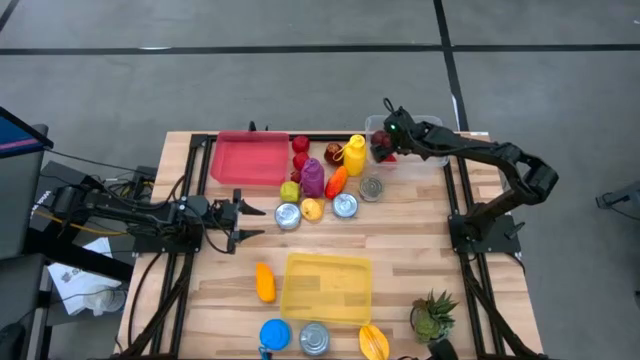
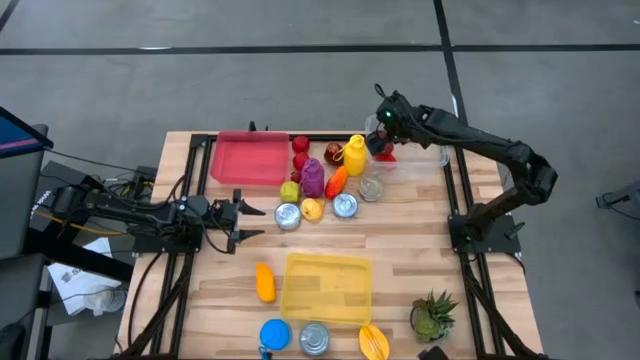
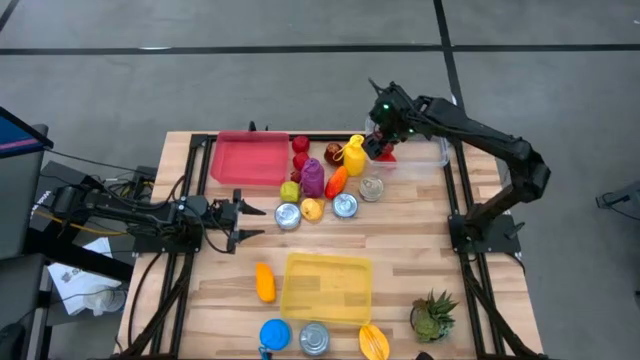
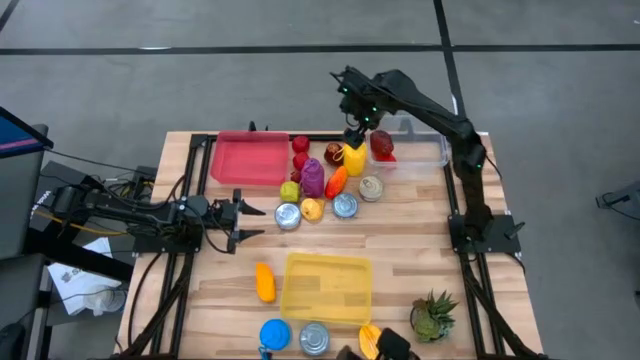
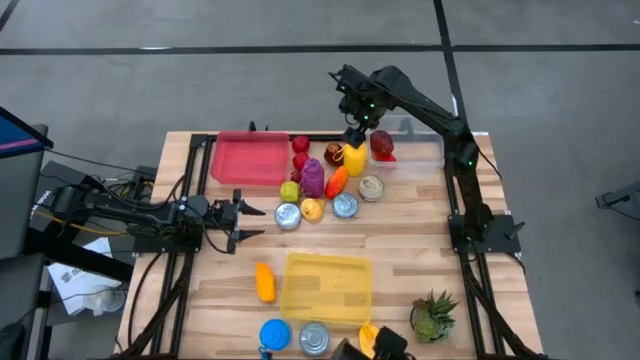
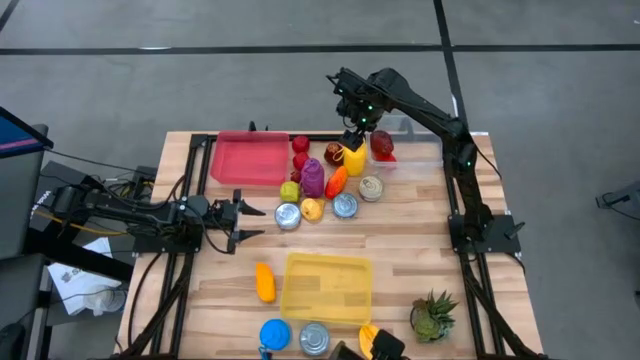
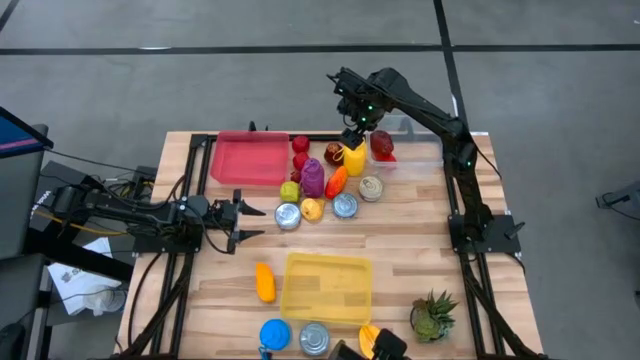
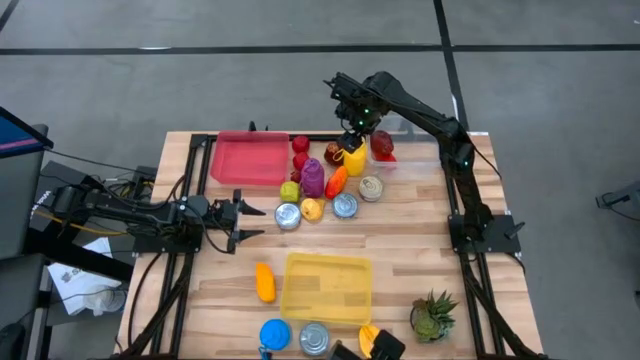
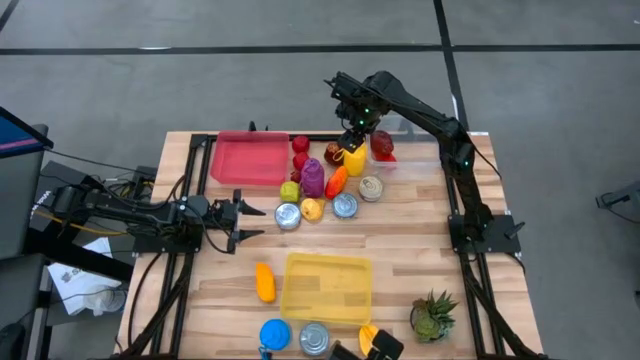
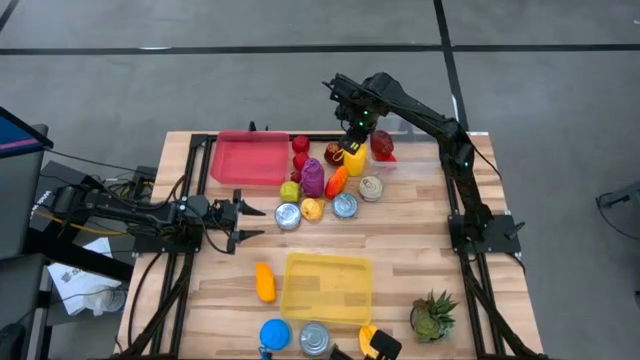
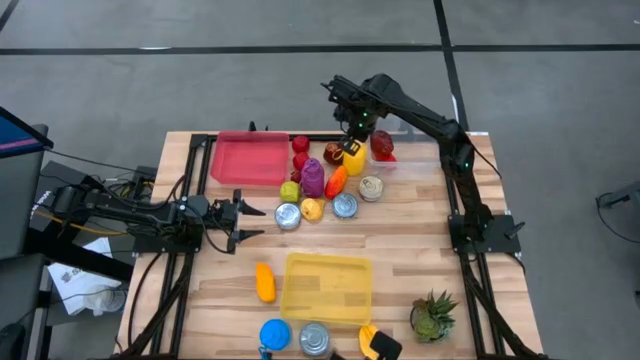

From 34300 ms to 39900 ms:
Task: Pick & Place Food Item
Put the yellow water bottle into the yellow bin

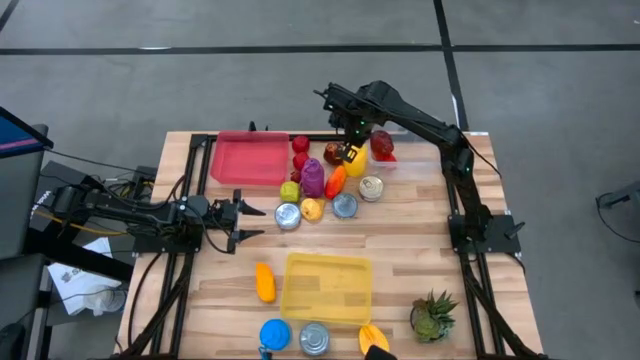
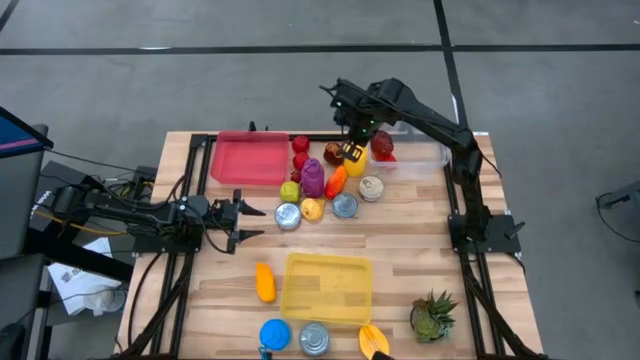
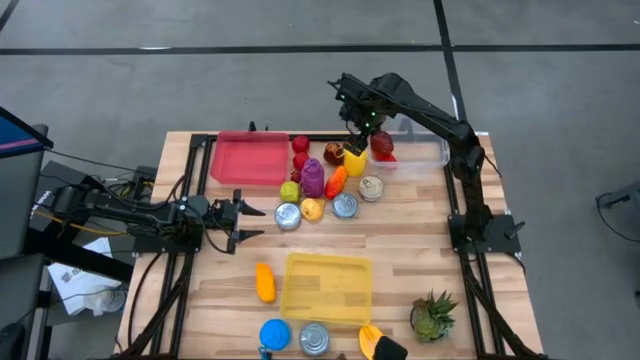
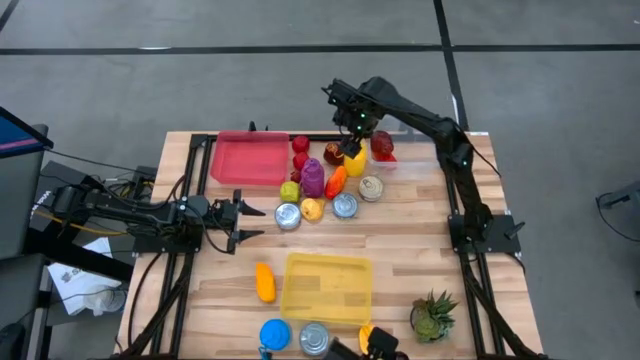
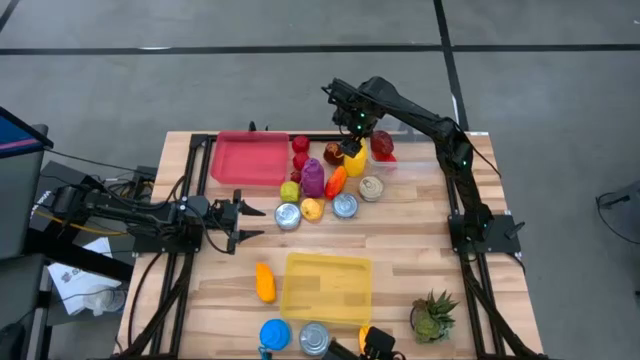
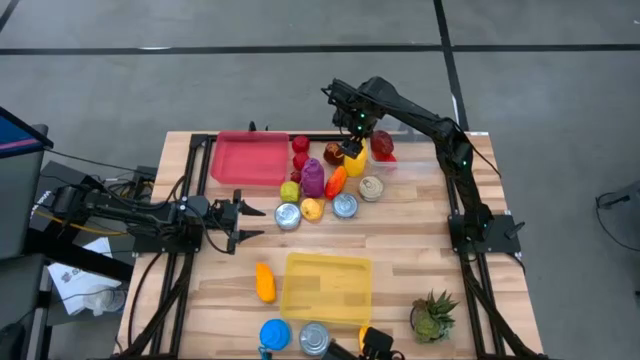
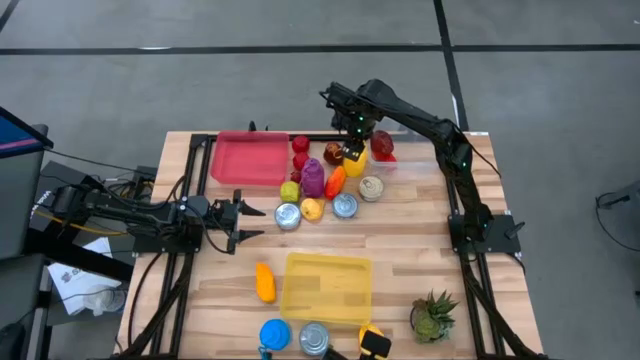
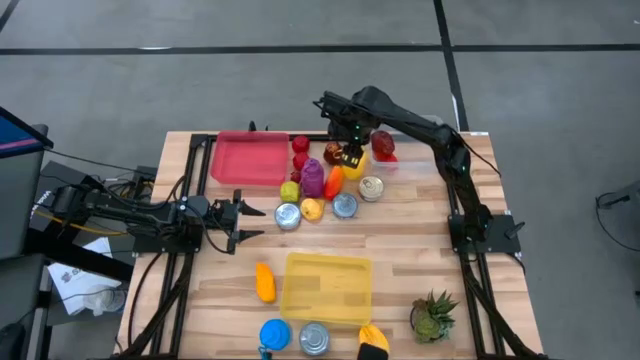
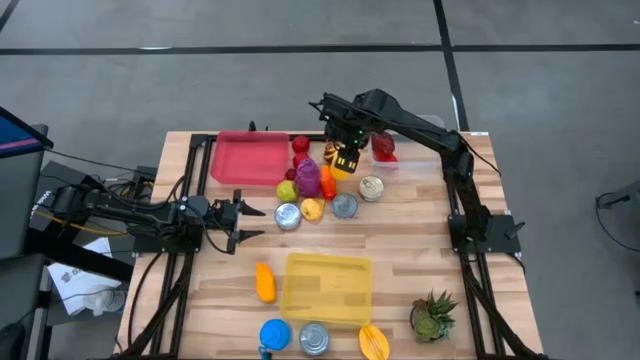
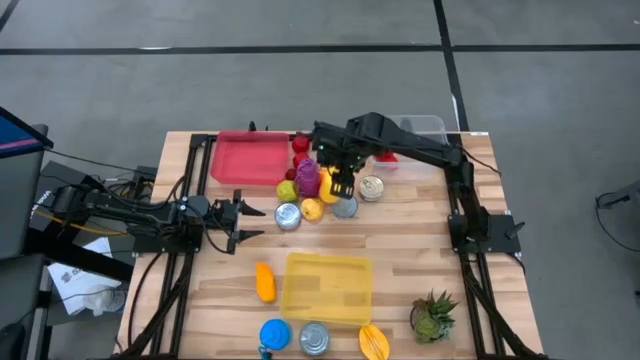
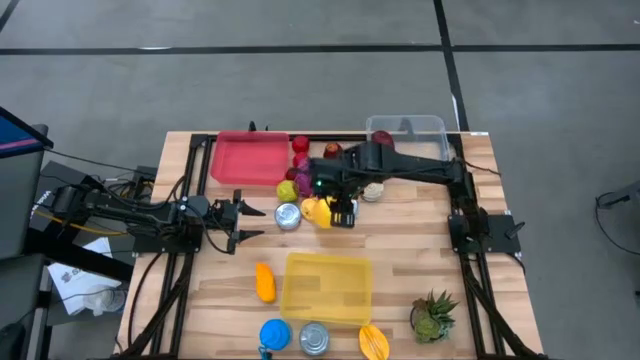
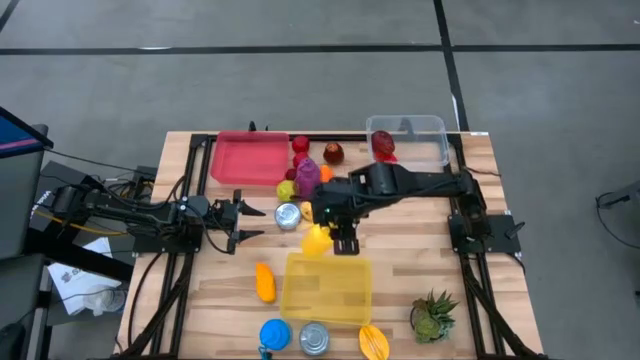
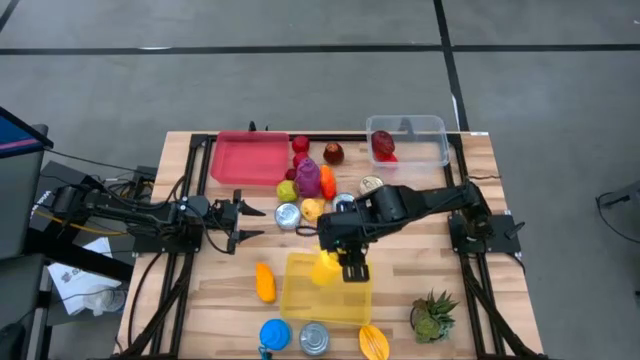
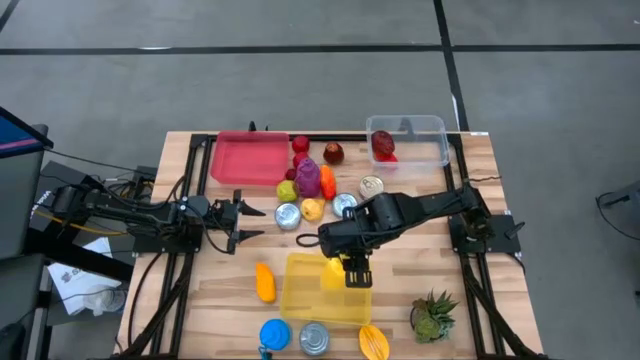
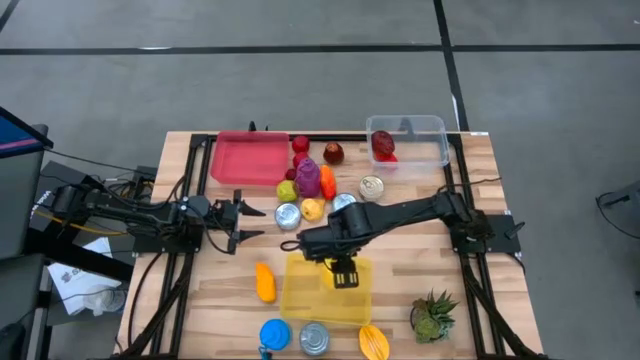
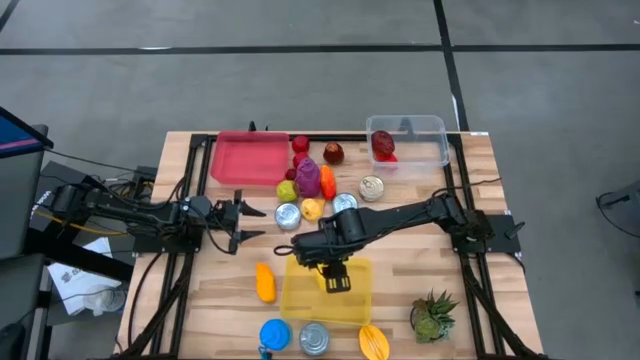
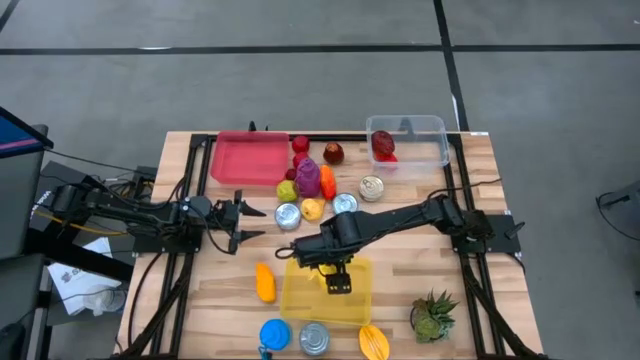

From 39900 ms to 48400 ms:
Put the yellow water bottle into the yellow bin

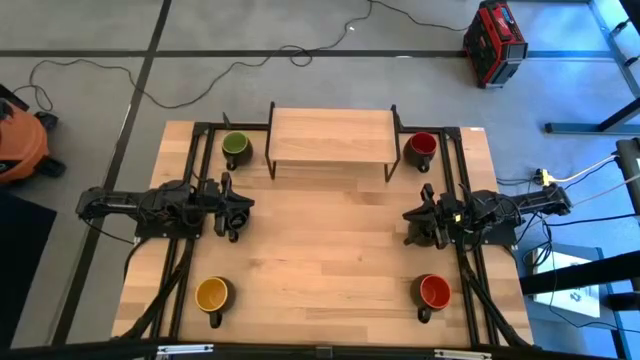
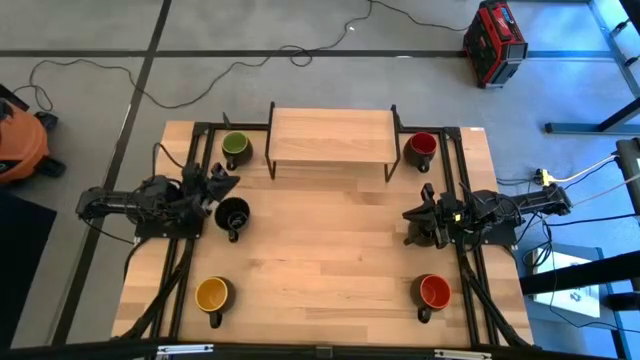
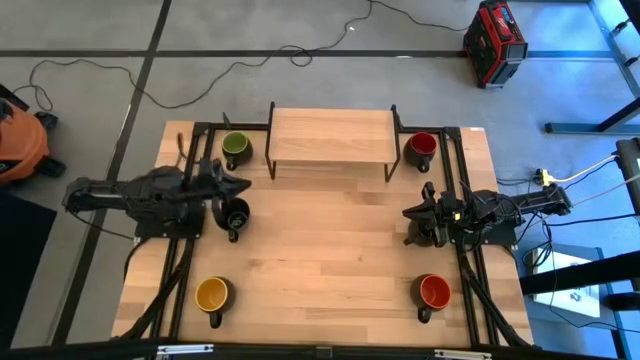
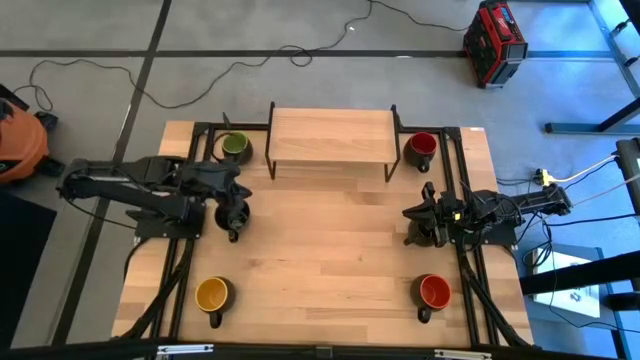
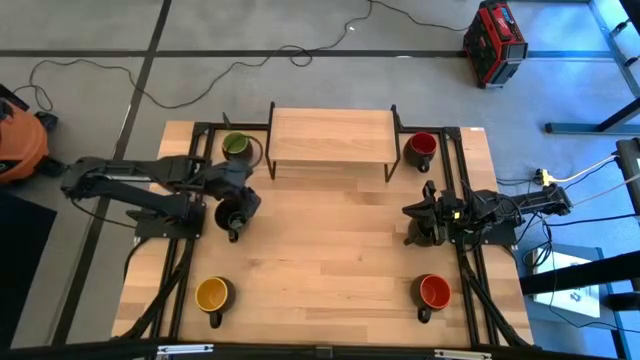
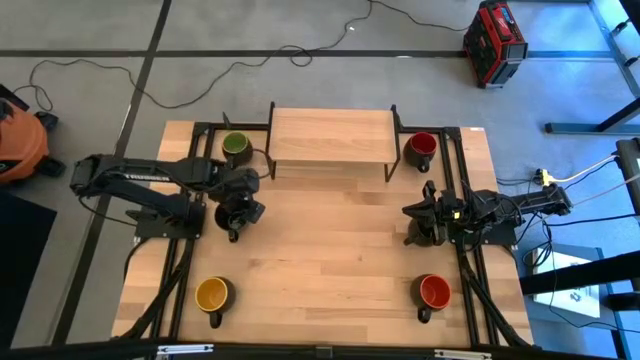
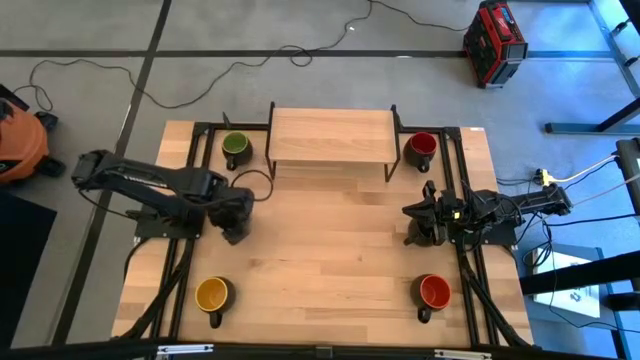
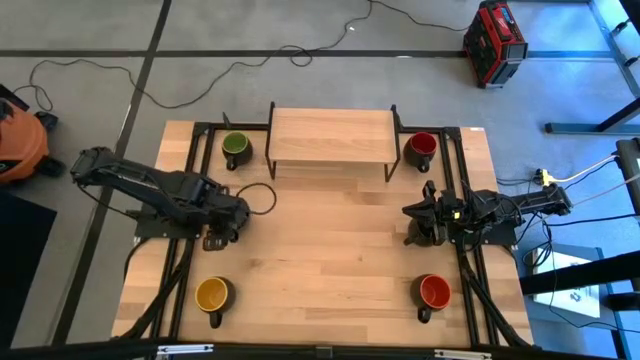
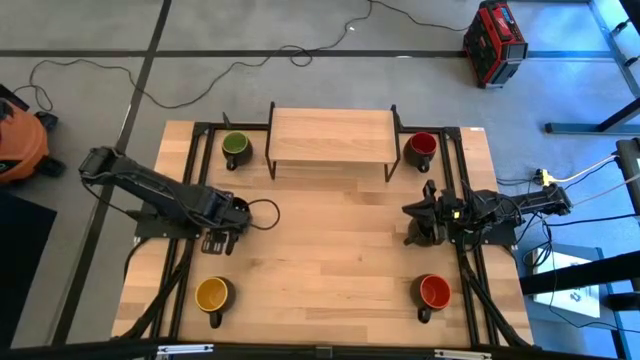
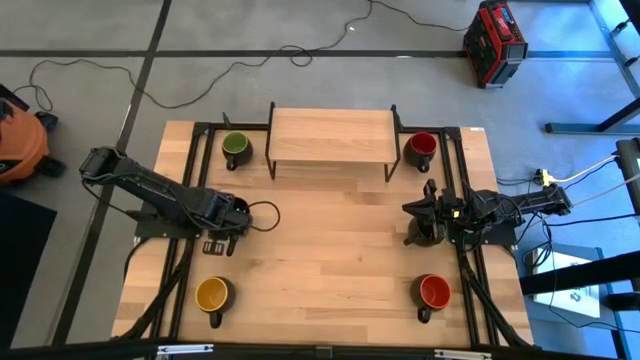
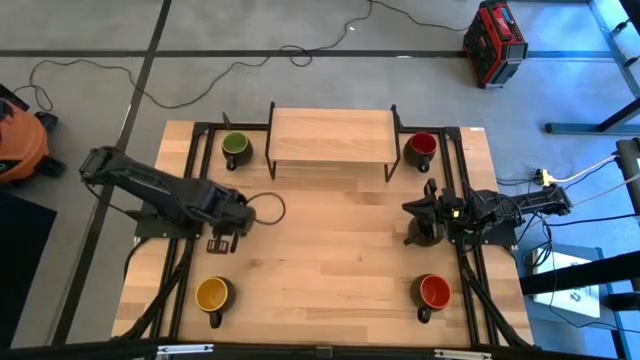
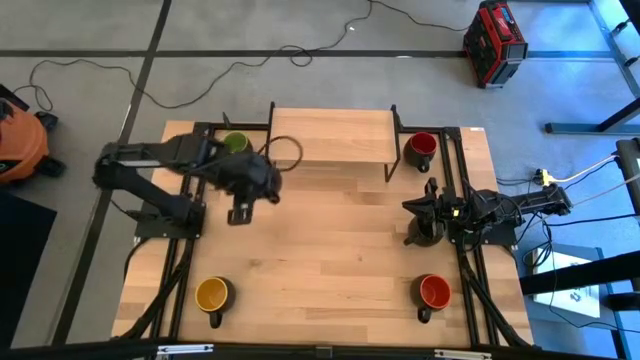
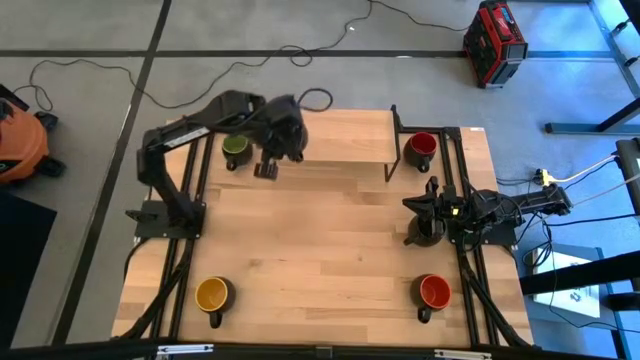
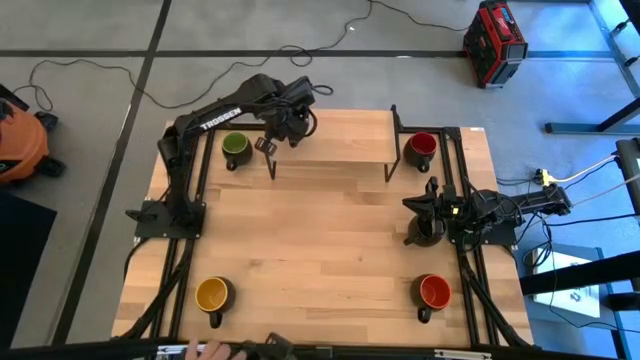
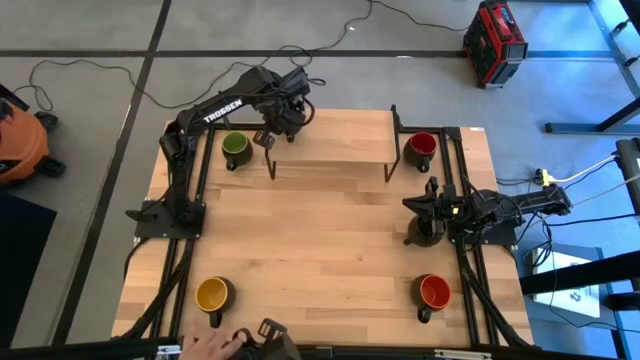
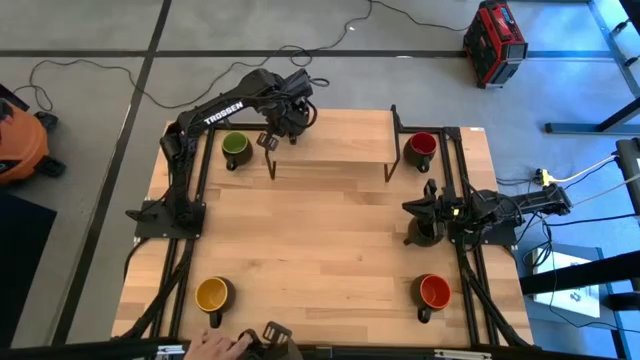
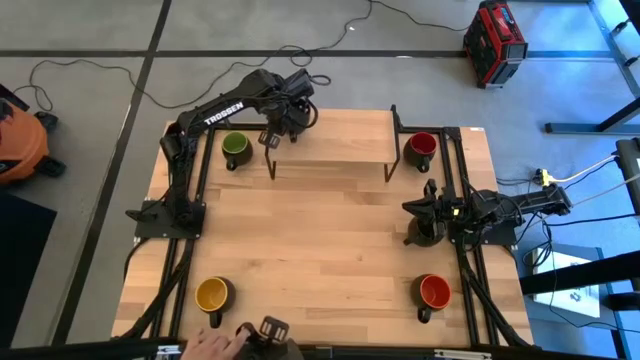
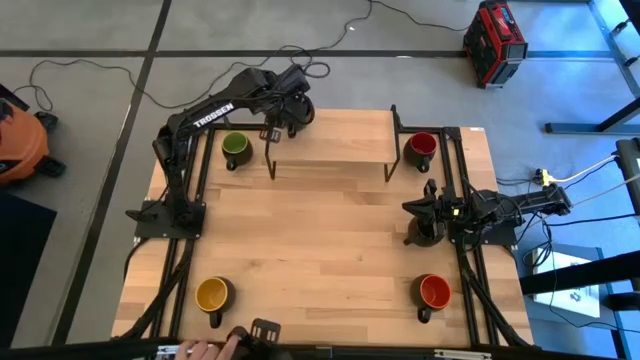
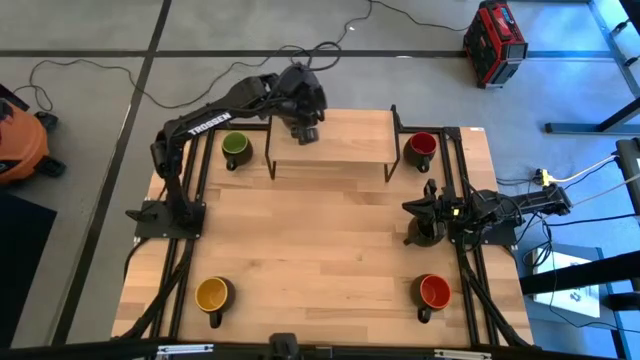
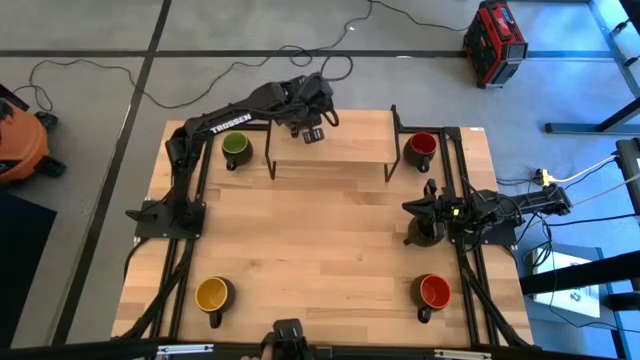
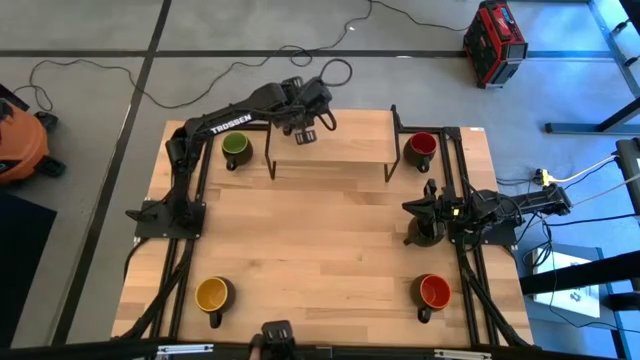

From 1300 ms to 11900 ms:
Task: Place coffee mugs
Put the left black mug on the shelf
